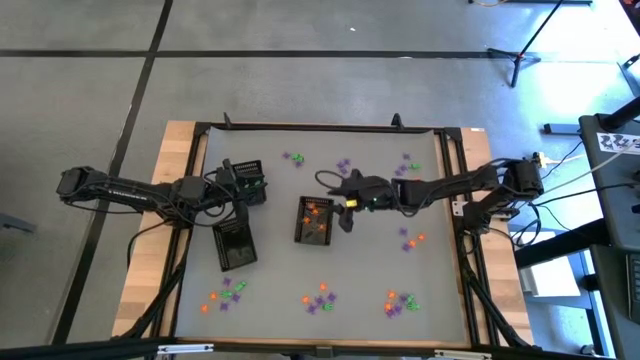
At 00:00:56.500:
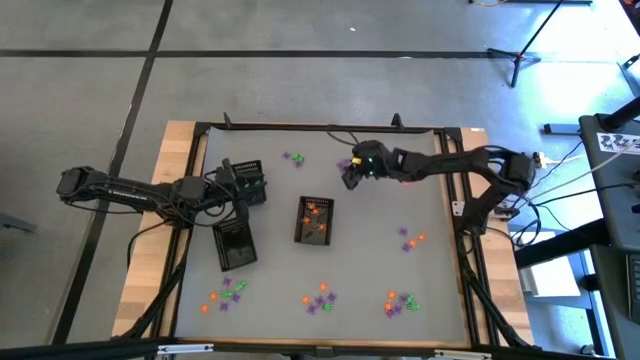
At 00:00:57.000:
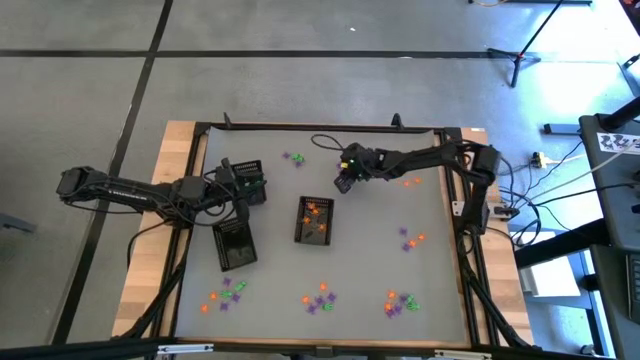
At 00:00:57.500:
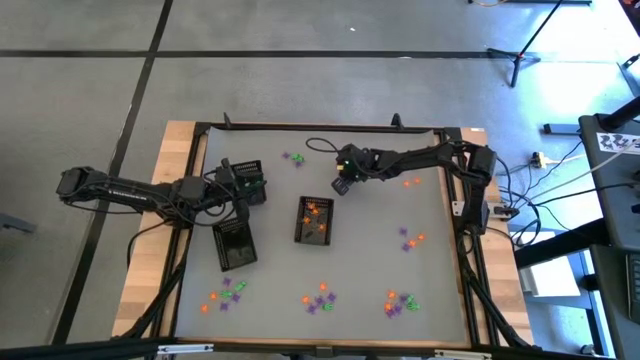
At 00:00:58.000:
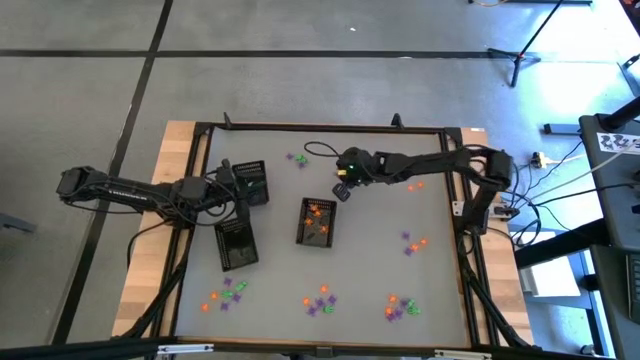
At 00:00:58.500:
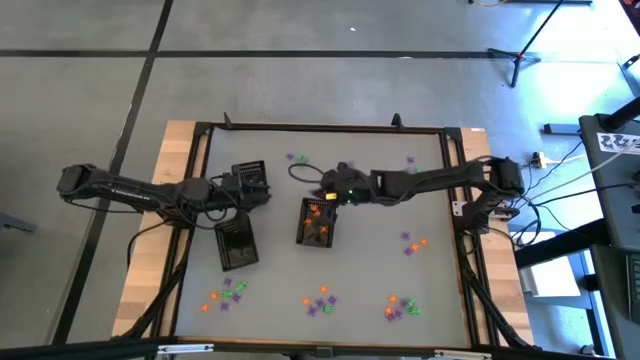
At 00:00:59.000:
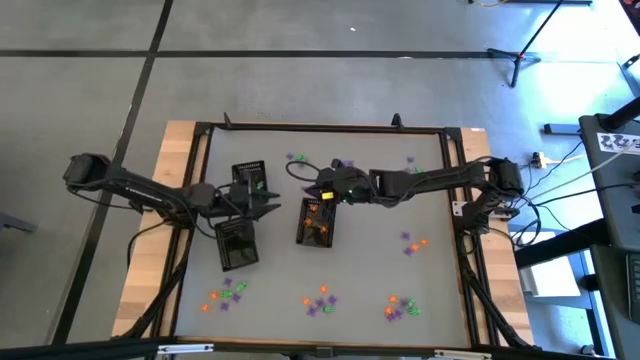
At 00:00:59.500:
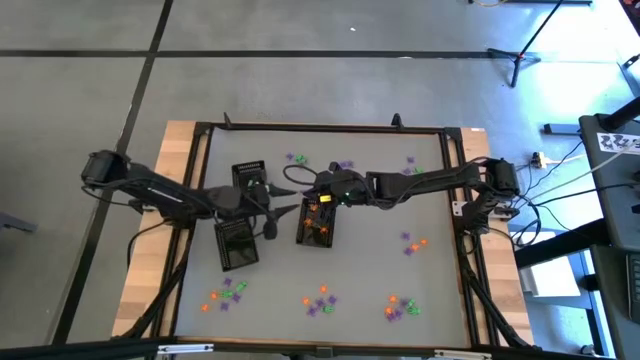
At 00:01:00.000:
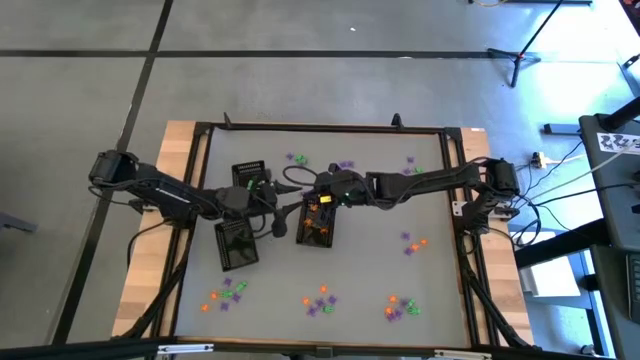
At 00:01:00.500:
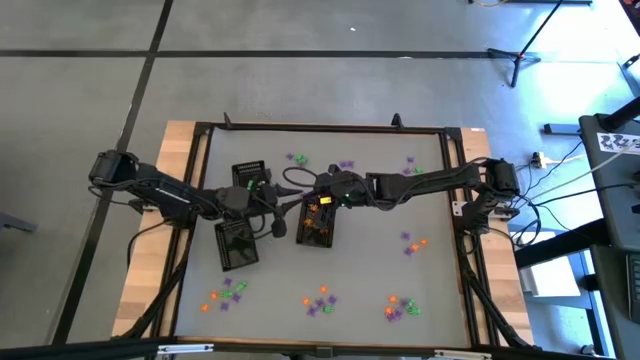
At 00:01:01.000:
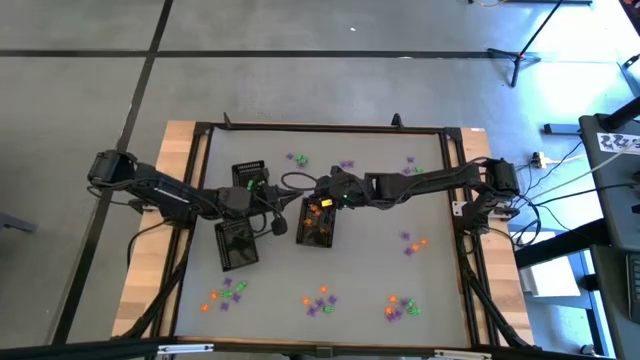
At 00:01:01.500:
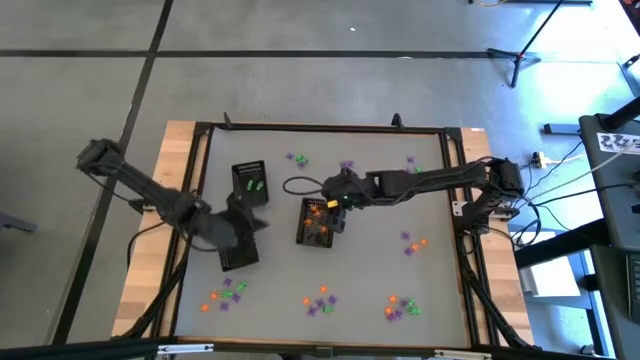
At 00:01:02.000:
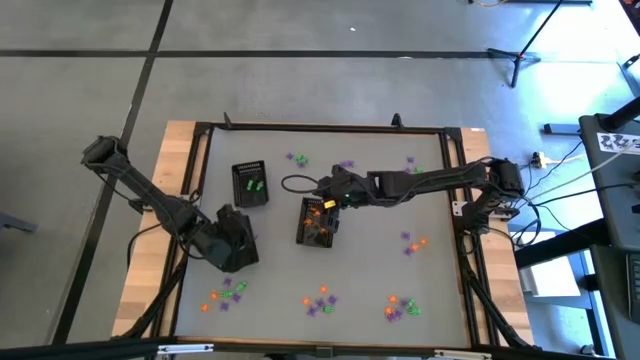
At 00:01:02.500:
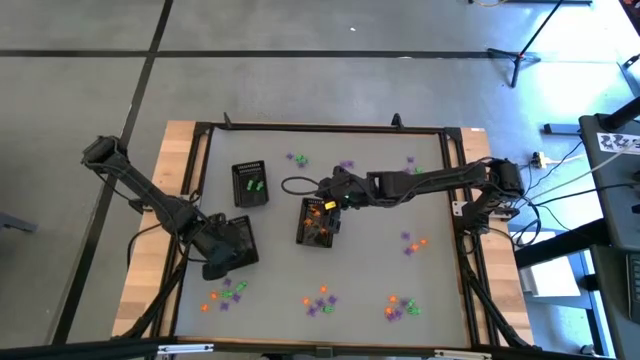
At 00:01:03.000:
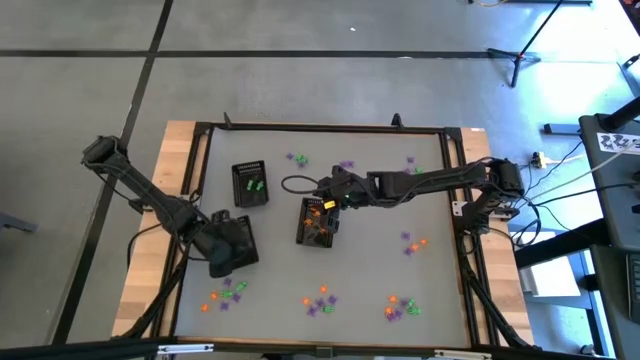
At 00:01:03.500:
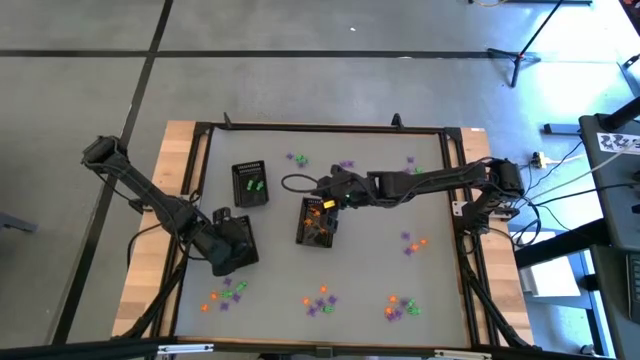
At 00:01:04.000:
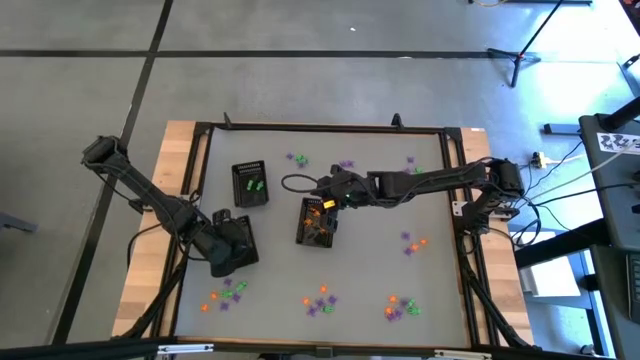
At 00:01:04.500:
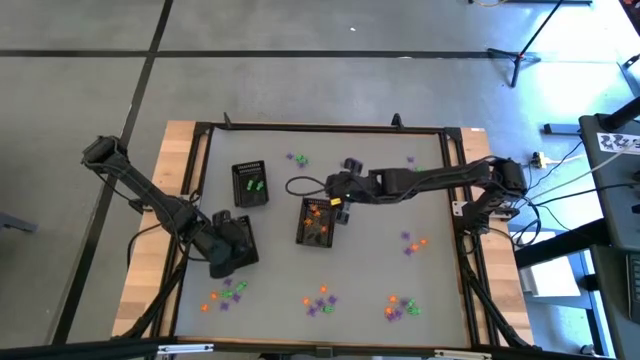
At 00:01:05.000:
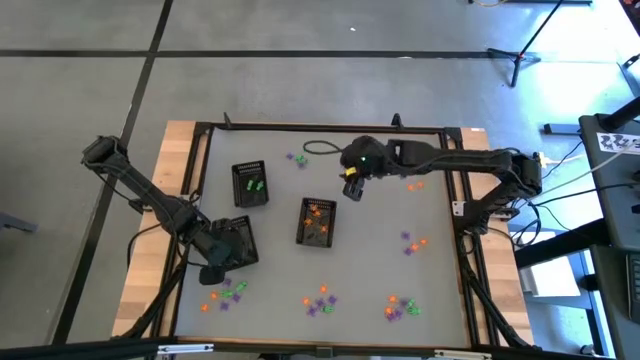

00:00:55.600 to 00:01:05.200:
Task: Sort Halloween decoration
Put the purple spider toy into the bottom left black basket

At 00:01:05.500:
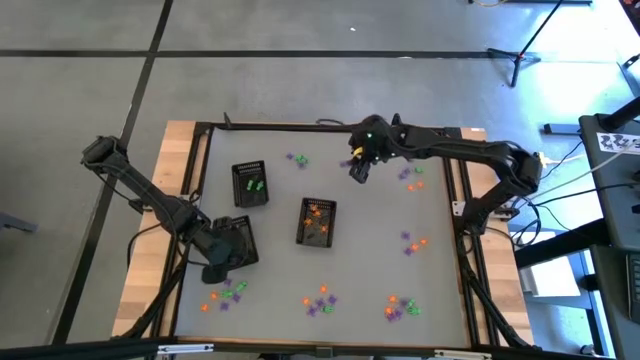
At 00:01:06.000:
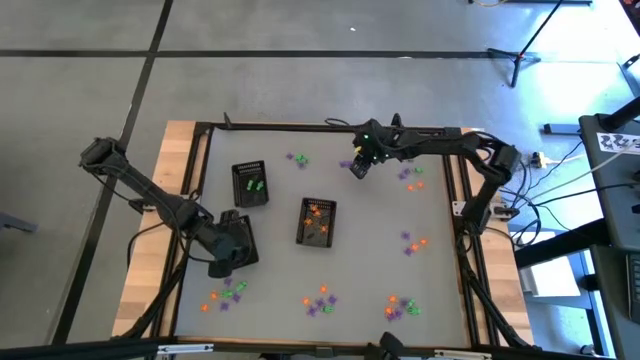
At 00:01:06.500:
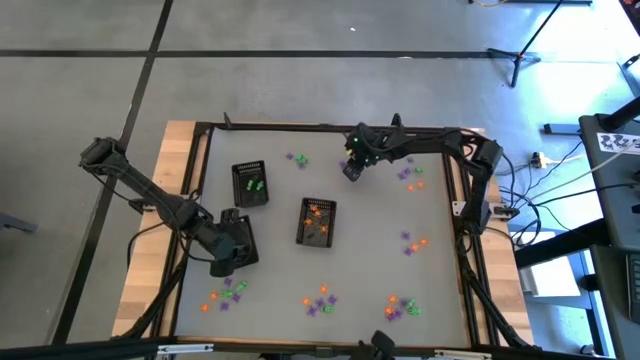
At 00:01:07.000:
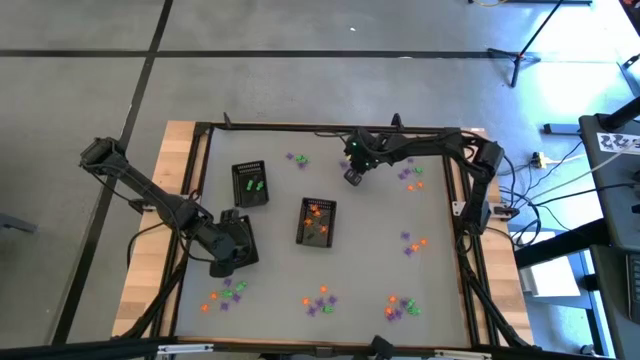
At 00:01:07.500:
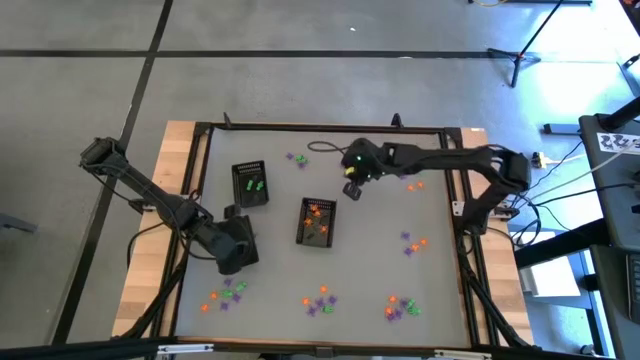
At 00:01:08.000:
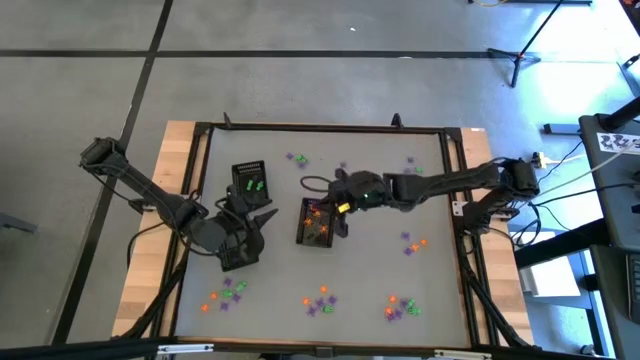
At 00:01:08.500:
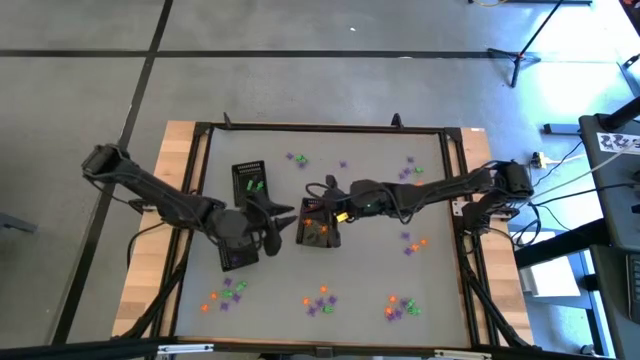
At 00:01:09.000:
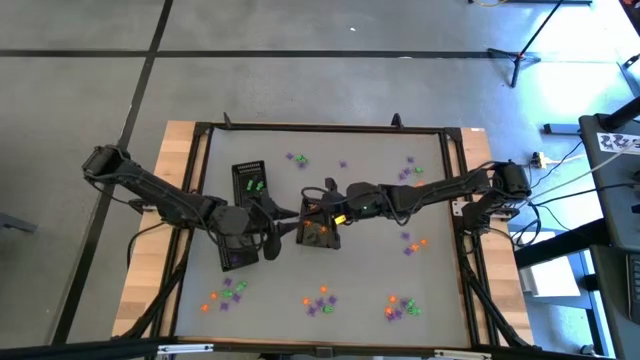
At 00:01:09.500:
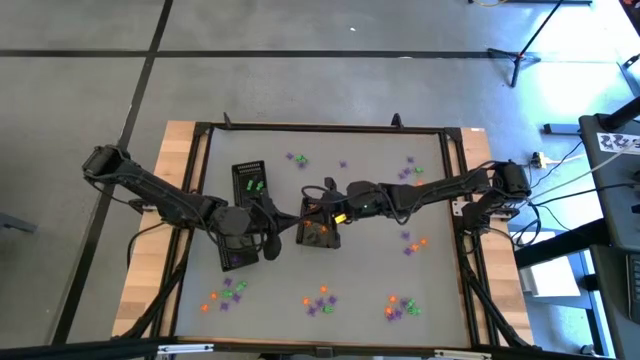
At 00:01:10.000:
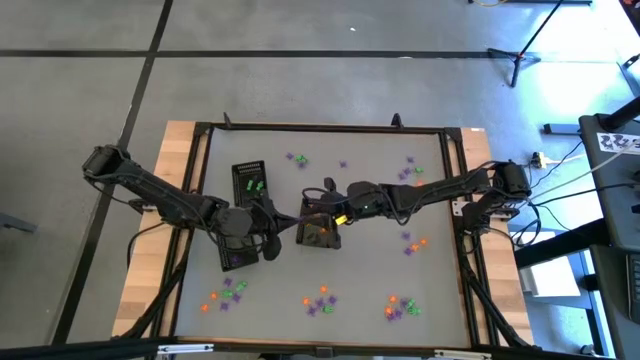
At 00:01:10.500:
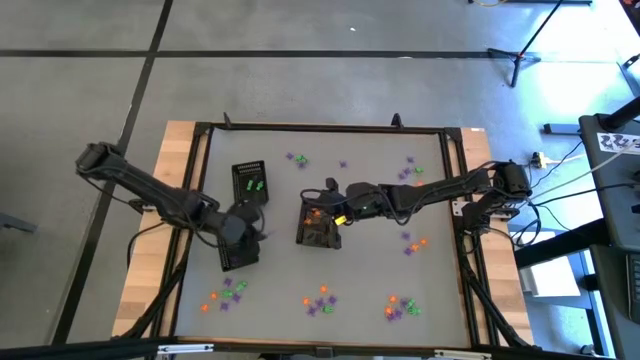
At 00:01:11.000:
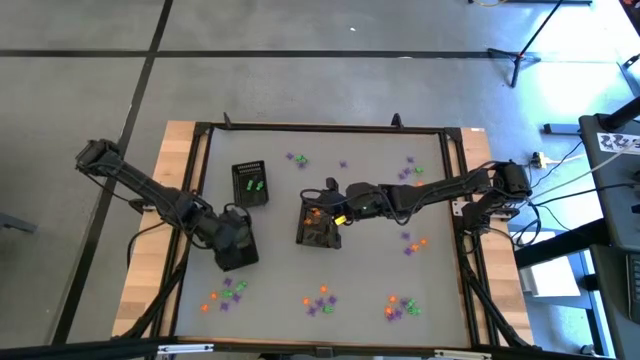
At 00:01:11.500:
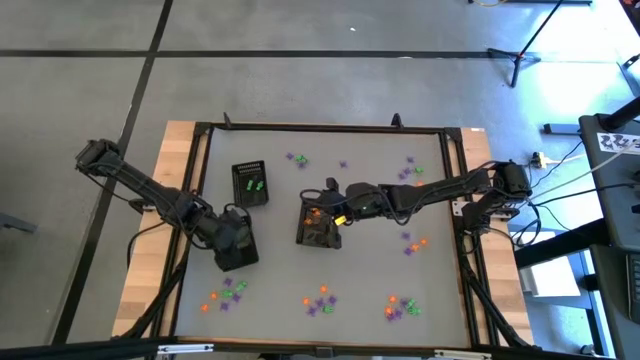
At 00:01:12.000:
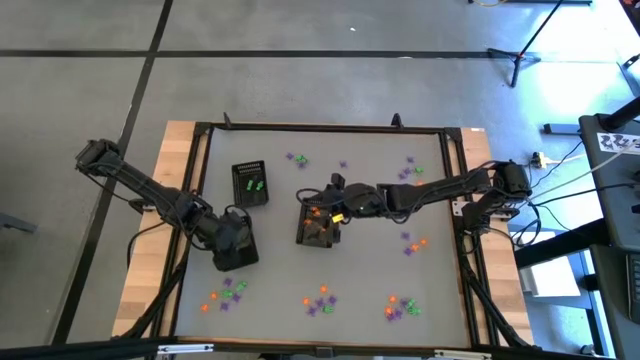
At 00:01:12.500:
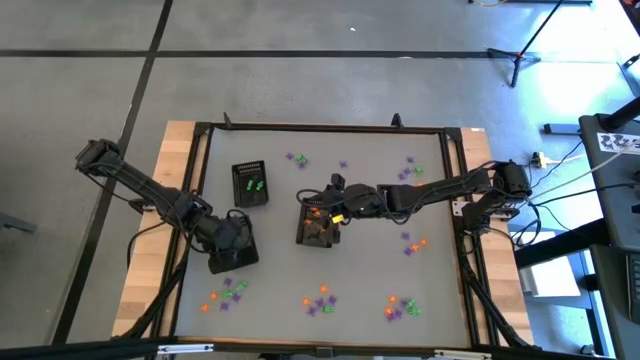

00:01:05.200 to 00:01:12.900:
Put the purple spider toy into the bottom left black basket

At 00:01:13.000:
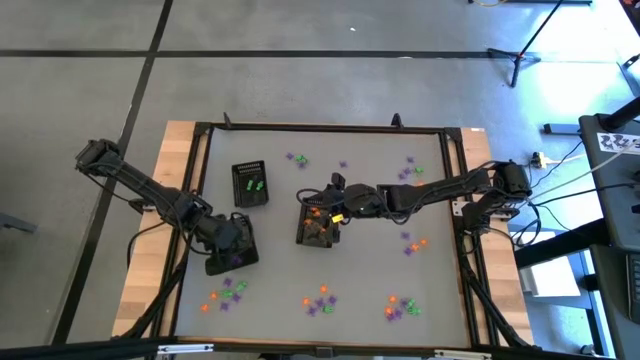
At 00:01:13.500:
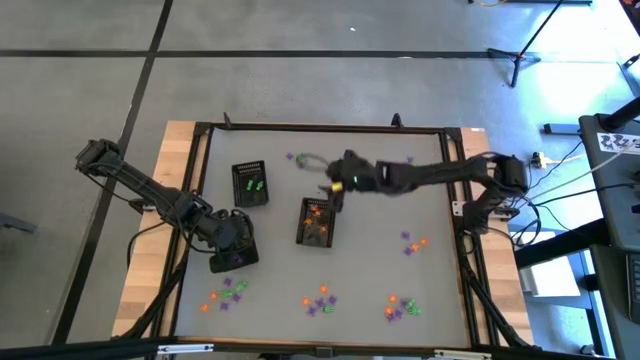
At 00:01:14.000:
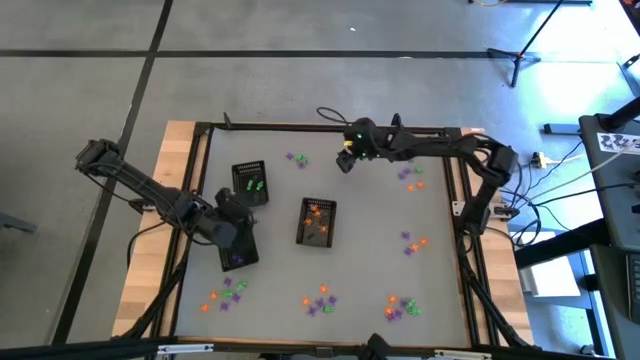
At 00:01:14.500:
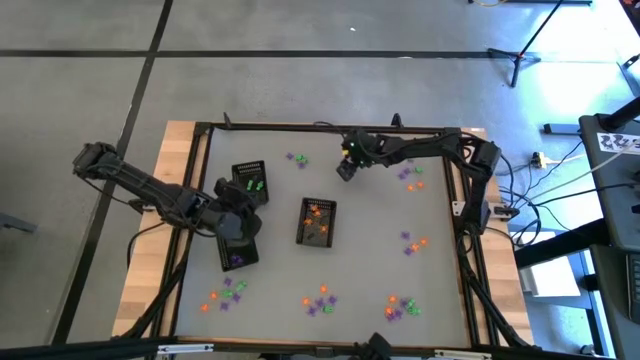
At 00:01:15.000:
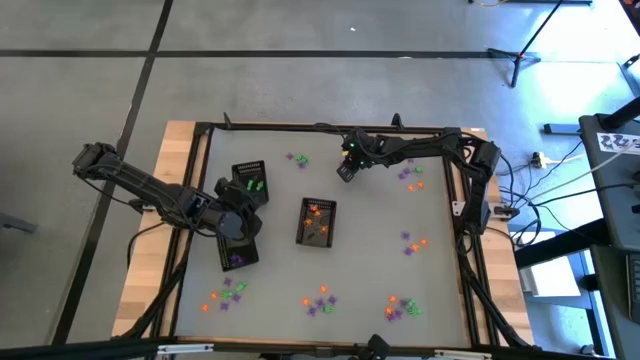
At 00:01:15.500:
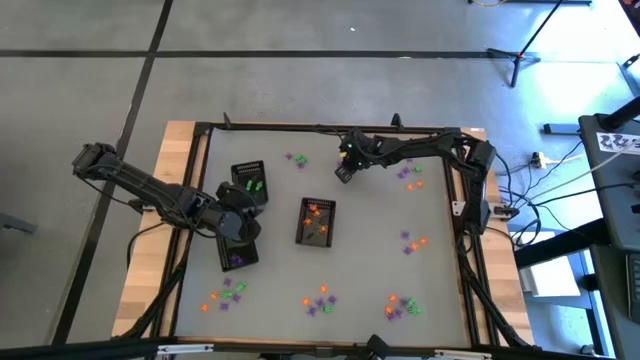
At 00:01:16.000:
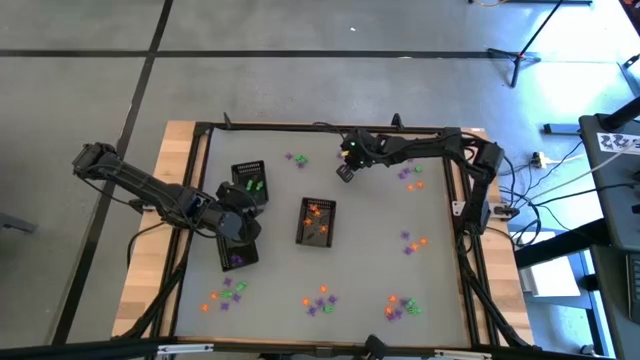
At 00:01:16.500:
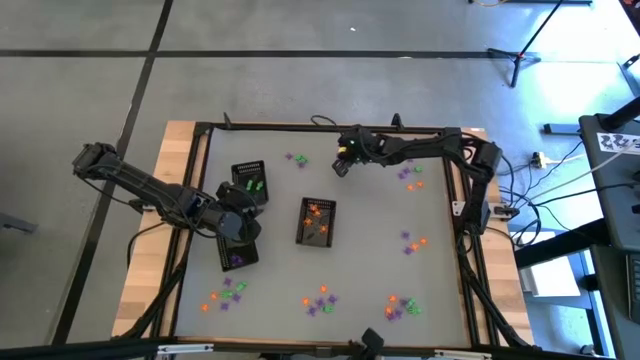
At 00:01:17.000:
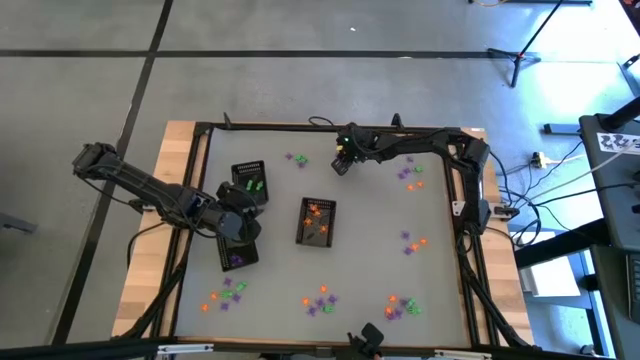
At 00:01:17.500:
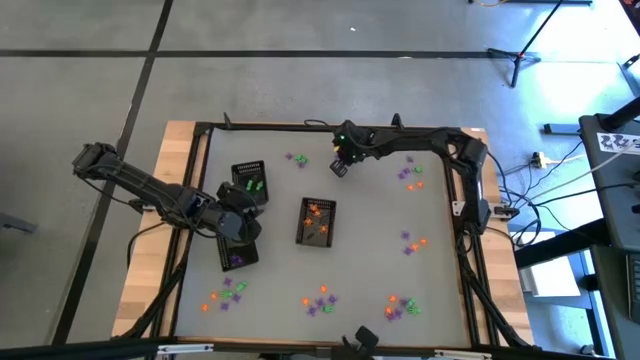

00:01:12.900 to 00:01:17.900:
Put the purple spider toy into the bottom left black basket
